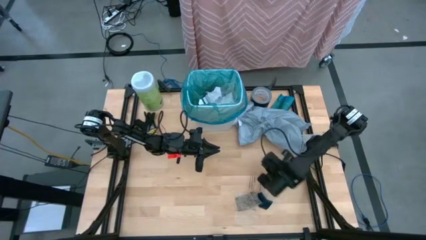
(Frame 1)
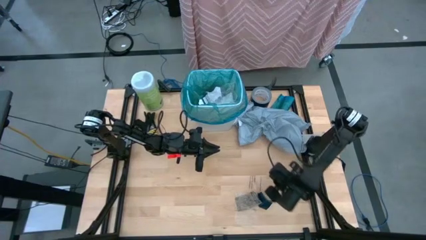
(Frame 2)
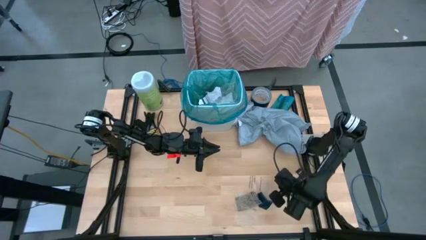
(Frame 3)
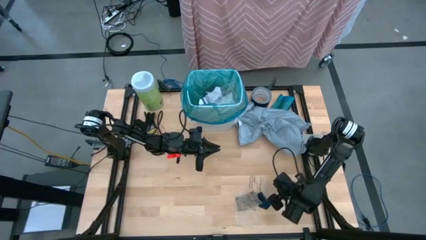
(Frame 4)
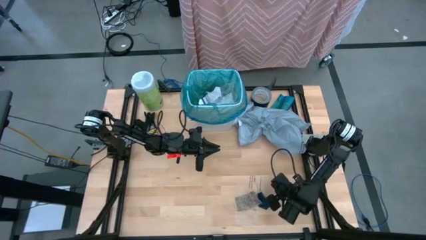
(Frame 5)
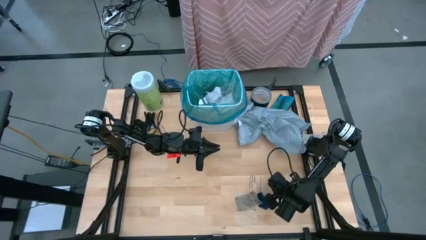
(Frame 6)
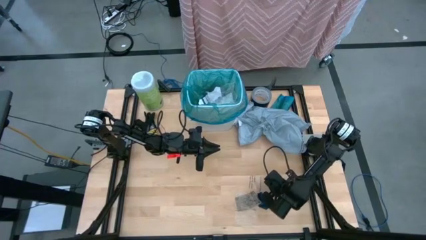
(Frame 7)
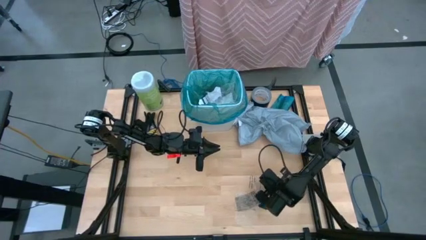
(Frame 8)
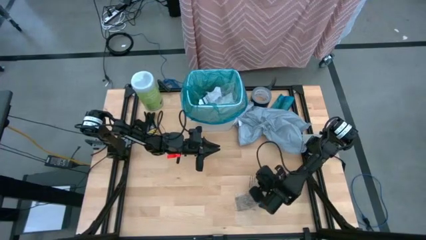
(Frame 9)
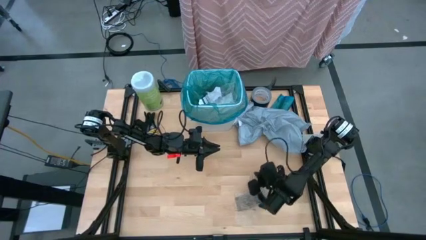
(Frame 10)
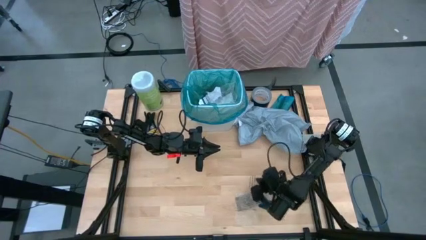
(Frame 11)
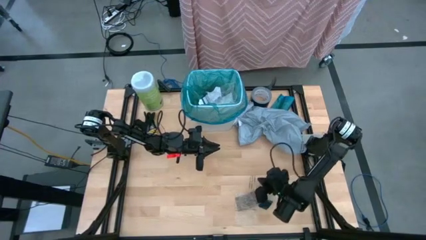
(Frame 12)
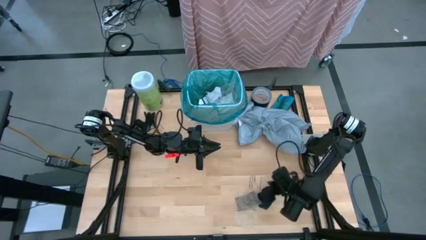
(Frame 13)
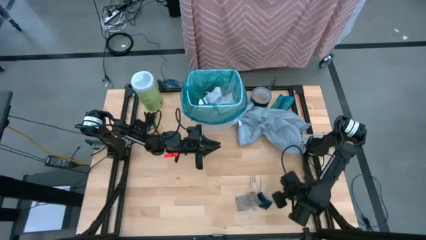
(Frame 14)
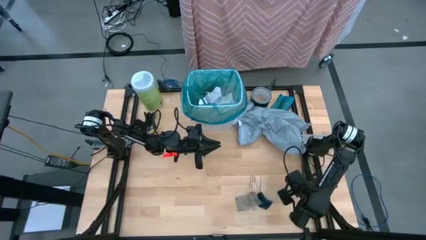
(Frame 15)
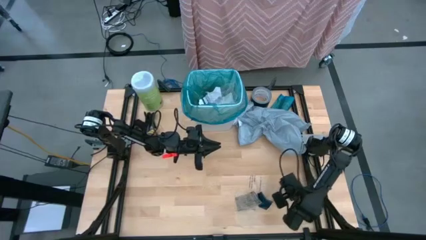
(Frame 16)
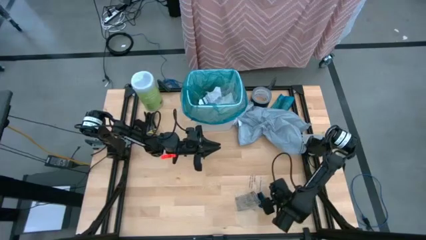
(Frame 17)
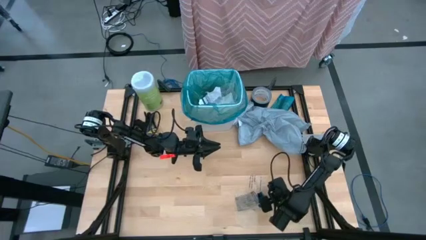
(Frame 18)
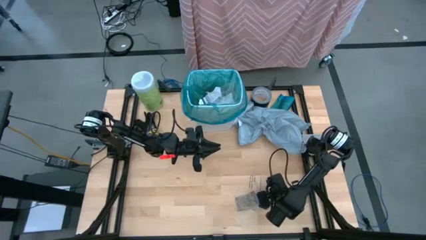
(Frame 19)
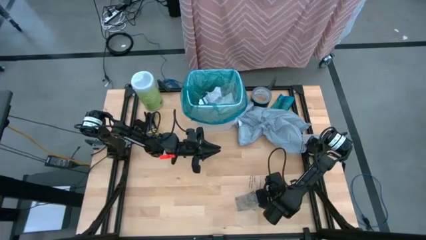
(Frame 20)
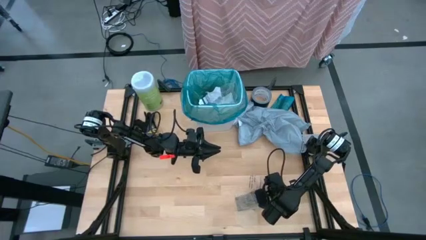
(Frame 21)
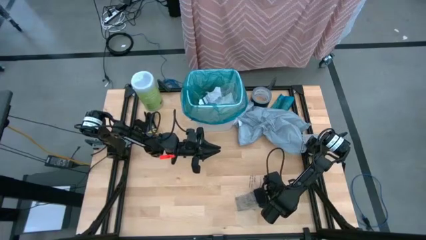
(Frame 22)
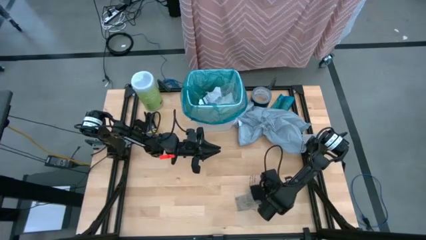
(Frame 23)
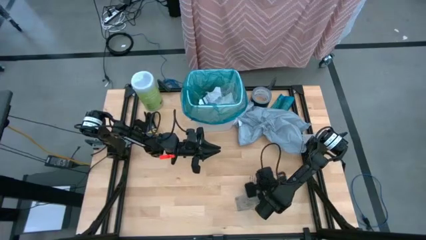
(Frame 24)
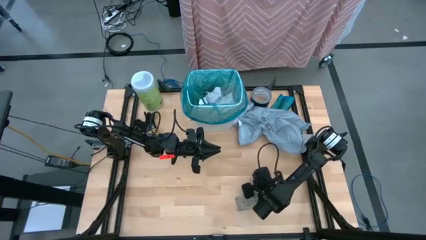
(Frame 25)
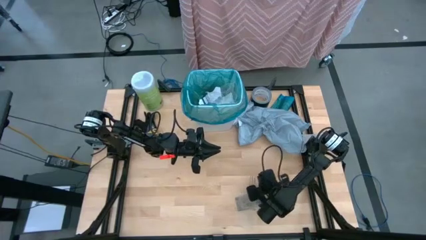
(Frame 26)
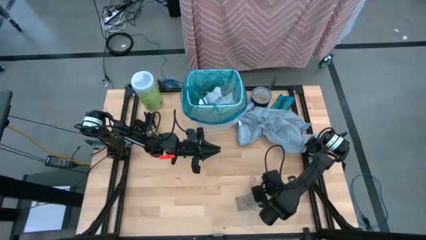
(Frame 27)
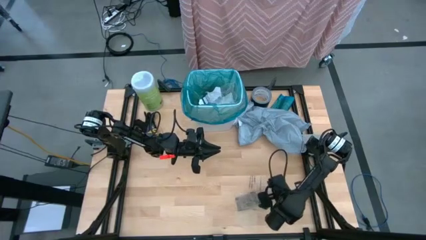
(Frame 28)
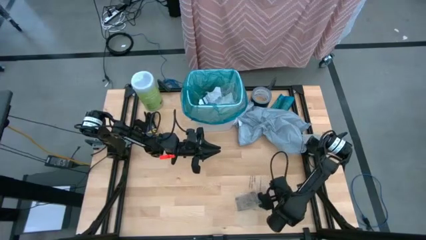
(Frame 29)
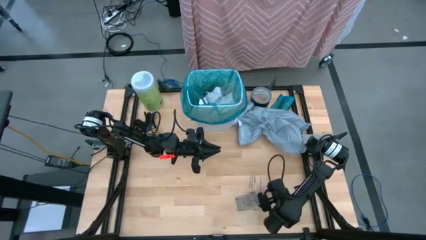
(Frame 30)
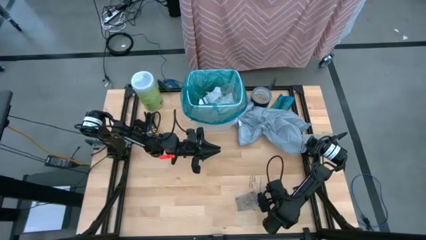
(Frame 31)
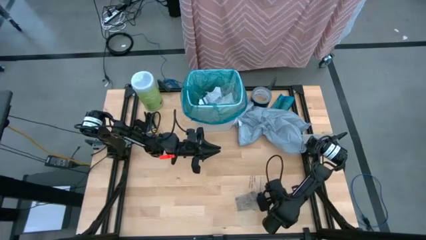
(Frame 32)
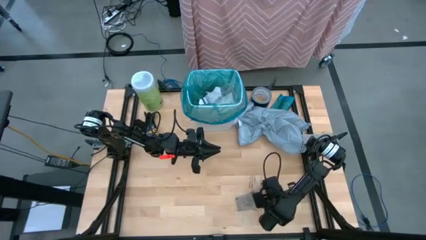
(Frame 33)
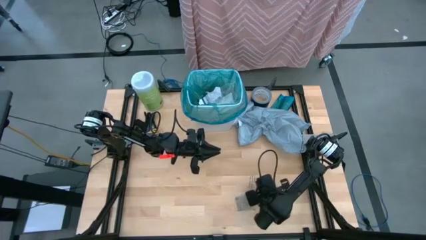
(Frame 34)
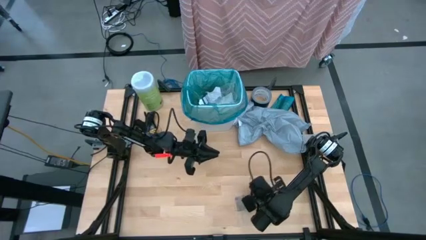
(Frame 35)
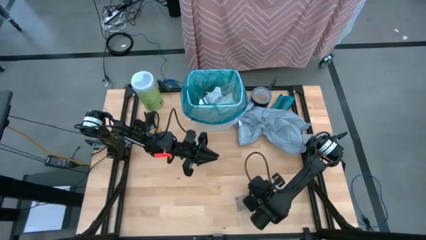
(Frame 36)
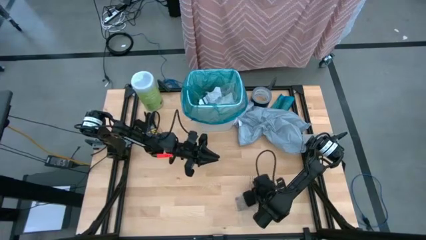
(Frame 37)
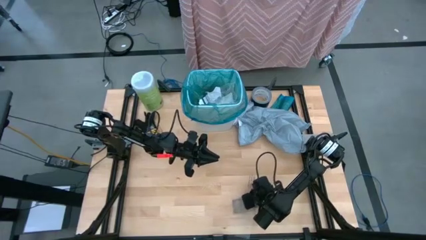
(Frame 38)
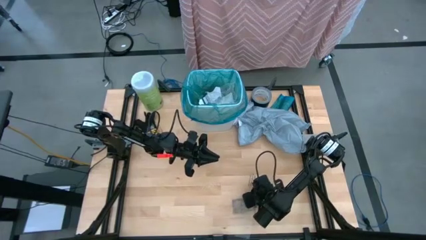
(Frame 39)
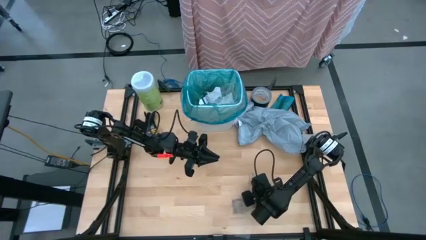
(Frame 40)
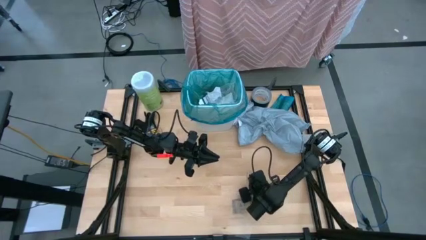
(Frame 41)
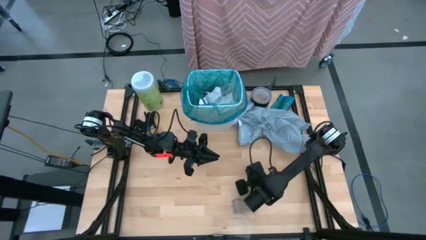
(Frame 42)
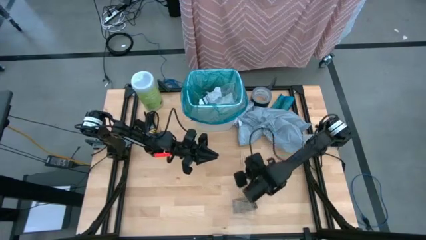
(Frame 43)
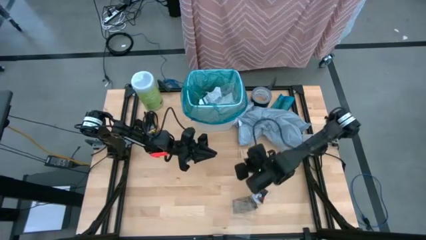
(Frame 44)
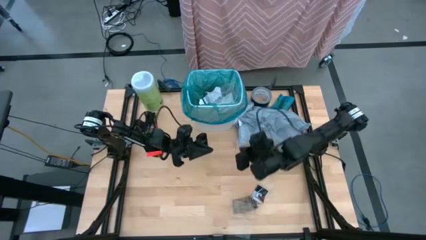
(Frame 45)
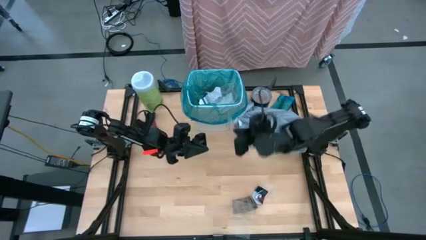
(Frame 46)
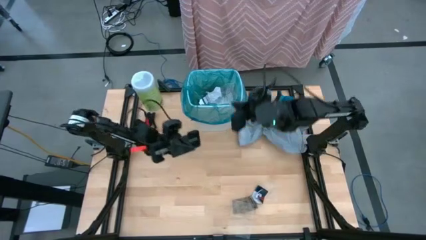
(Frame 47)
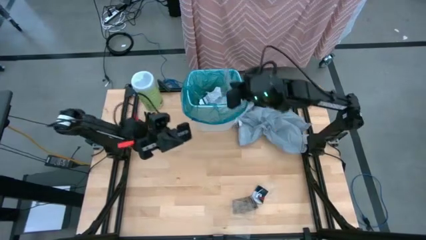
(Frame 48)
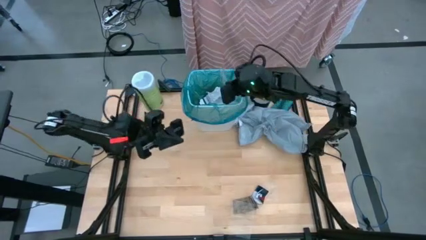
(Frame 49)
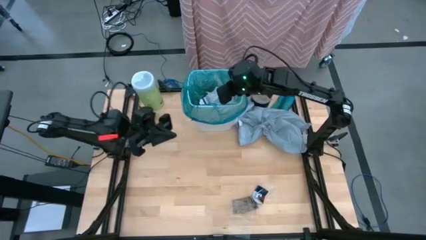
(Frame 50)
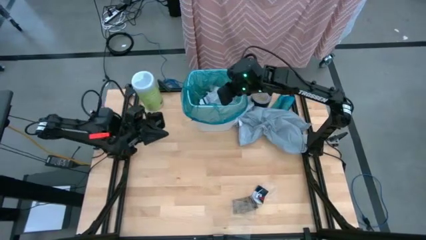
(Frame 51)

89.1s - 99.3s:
Task: place trash/remove bag and relplace
Put the transparent plastic material into the trash bin

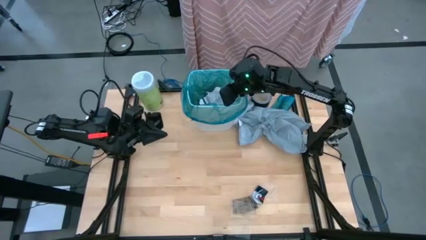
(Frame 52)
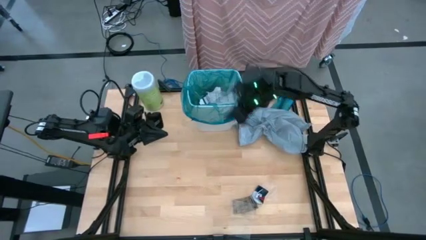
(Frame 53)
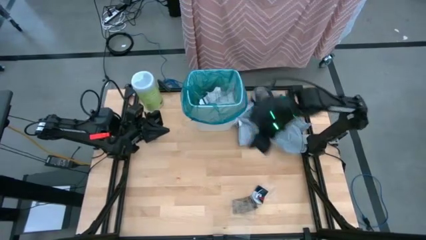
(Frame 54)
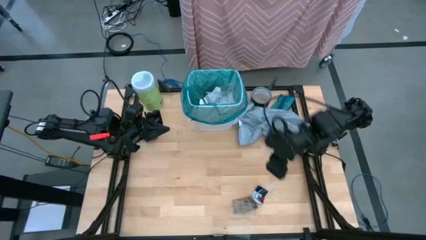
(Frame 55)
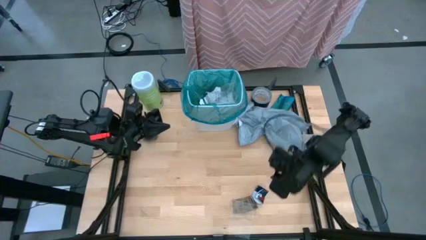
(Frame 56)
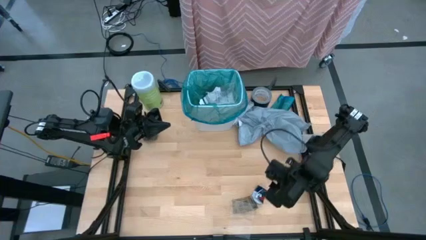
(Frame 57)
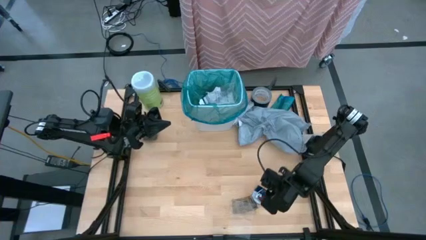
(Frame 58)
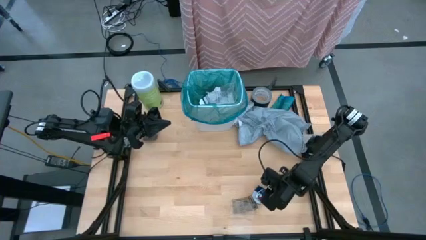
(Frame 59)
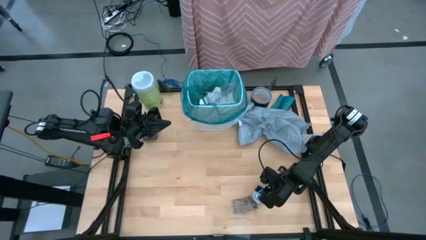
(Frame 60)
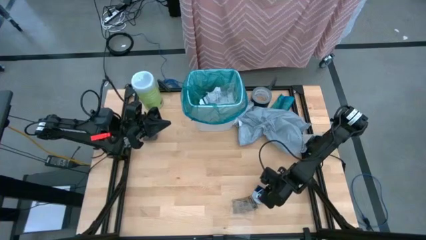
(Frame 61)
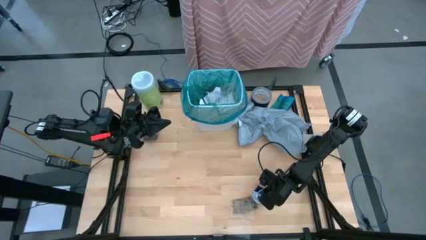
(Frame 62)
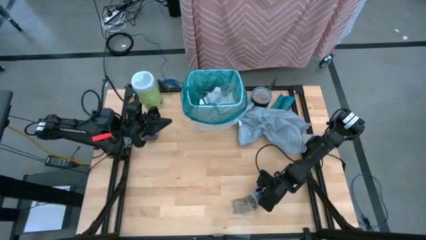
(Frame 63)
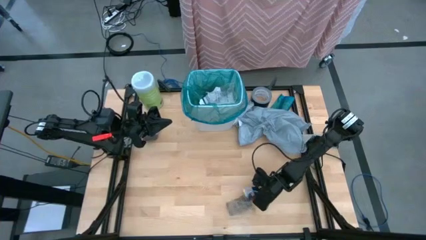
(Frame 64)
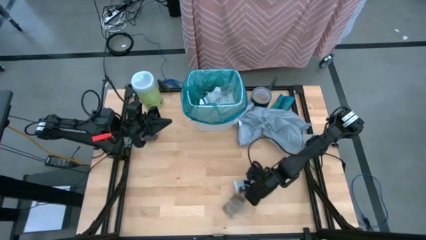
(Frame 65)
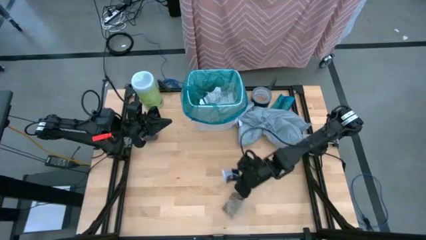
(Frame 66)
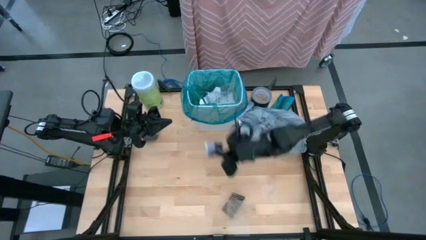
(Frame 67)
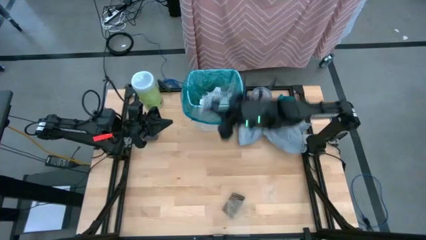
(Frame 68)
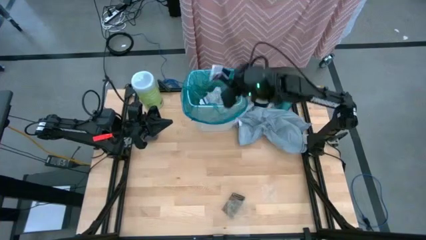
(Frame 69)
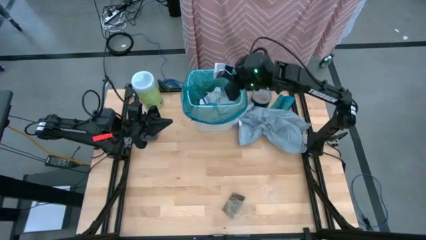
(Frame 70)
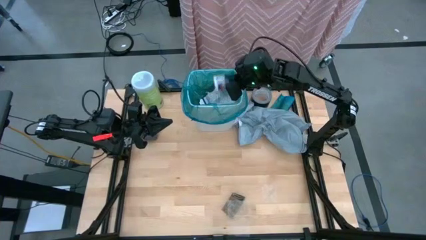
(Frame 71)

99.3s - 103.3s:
Put the white paper into the trash bin

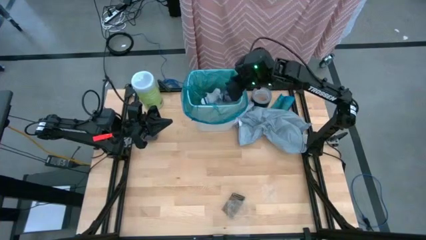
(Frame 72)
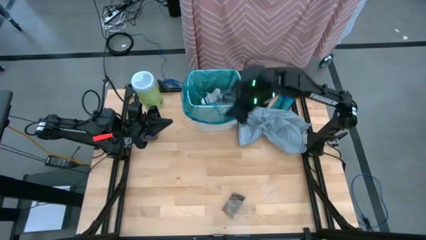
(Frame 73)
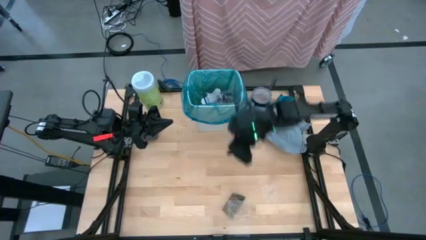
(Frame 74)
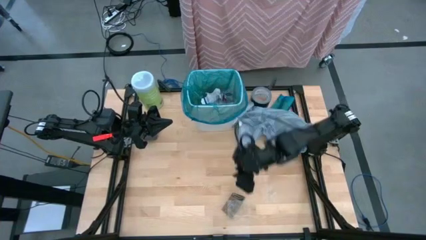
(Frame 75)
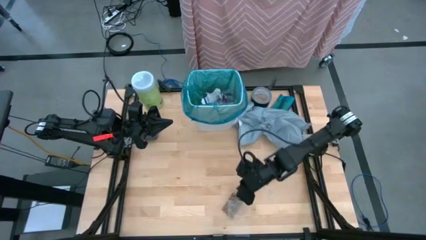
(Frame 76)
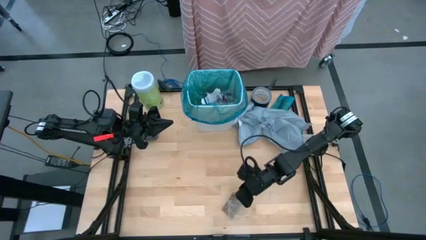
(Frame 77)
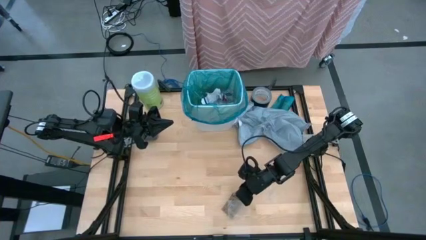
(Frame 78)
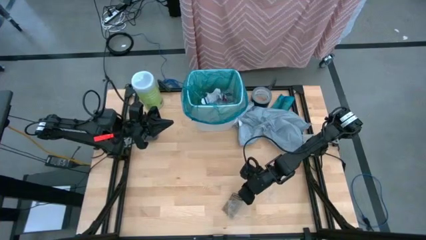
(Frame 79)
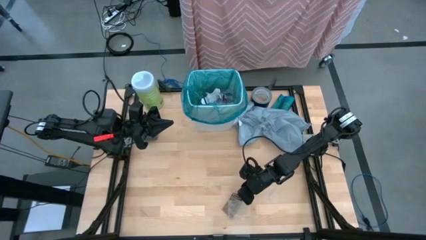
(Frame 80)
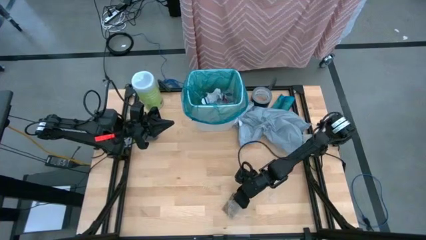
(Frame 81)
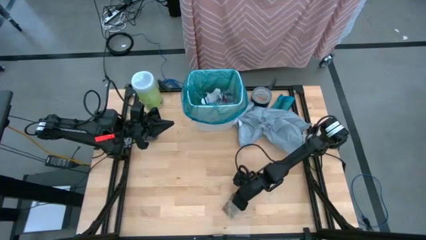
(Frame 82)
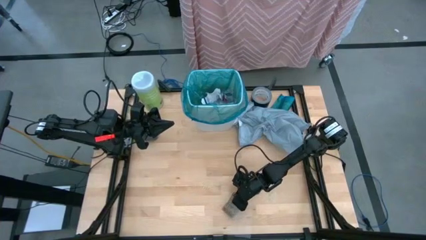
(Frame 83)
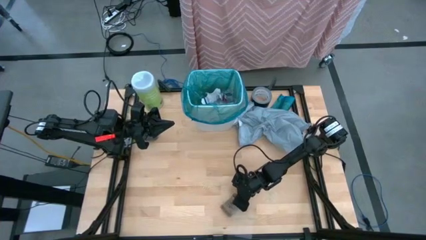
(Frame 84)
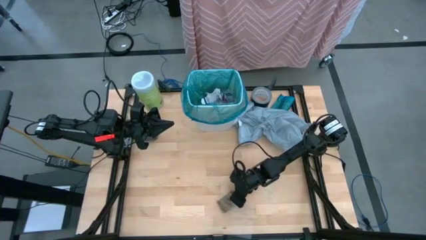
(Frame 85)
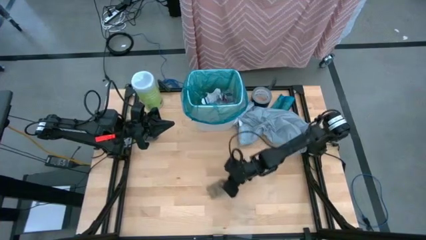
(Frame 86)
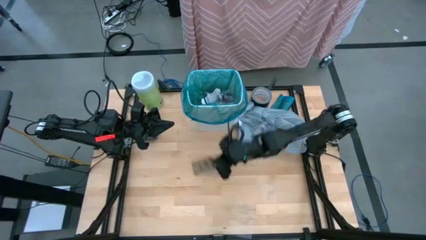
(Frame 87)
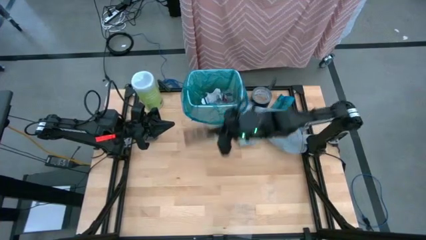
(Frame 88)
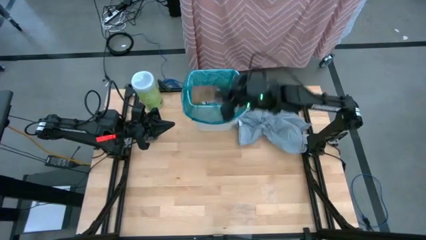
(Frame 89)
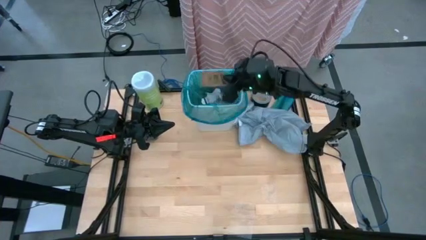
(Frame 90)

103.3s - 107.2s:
Put the brown paper into the trash bin
